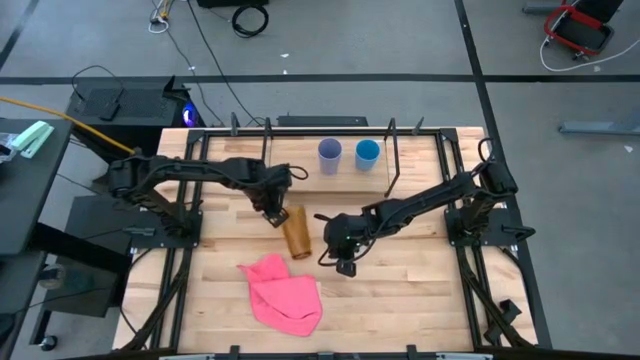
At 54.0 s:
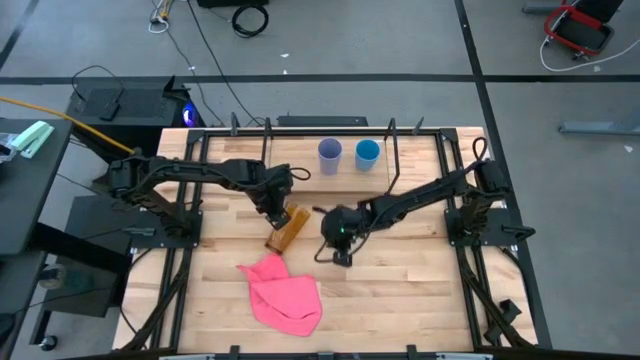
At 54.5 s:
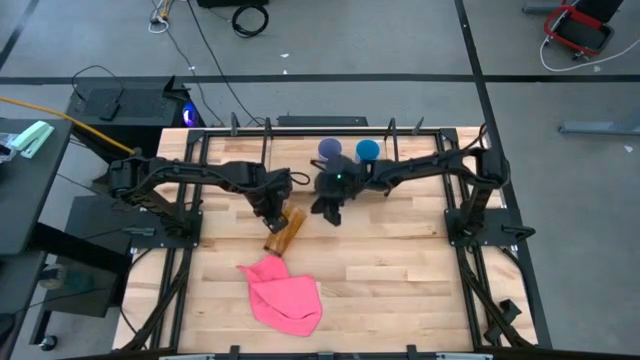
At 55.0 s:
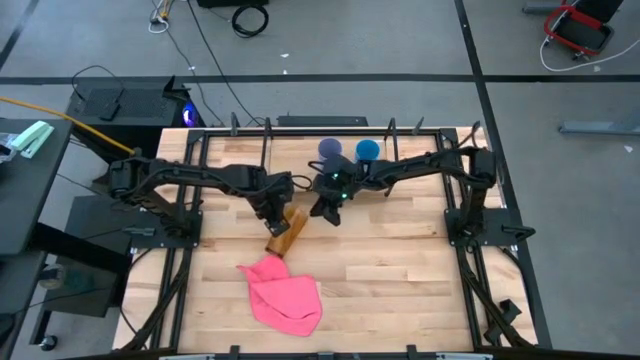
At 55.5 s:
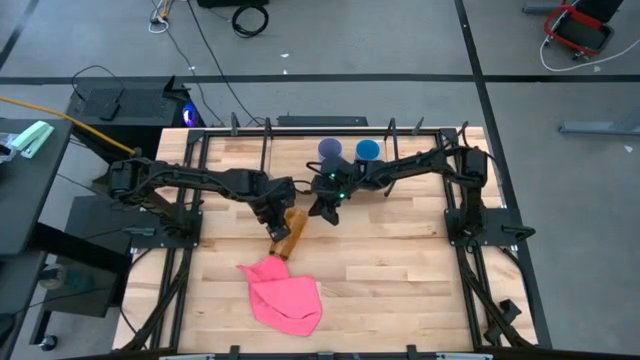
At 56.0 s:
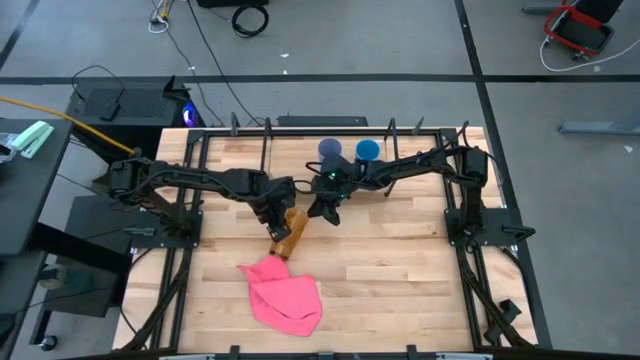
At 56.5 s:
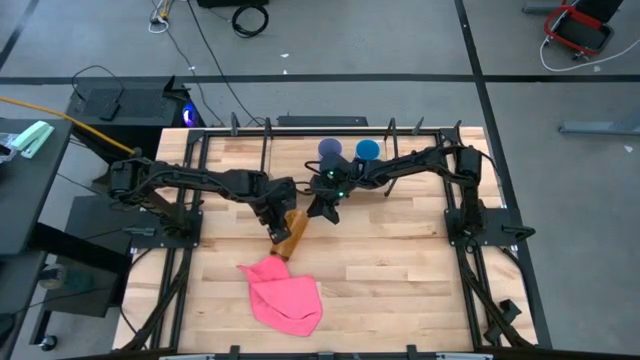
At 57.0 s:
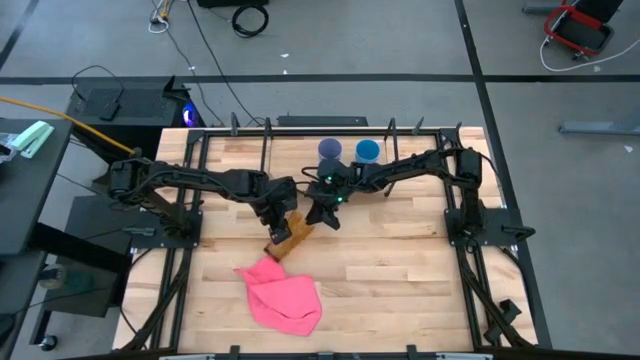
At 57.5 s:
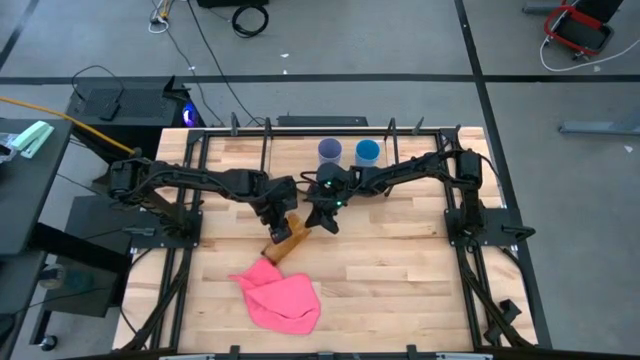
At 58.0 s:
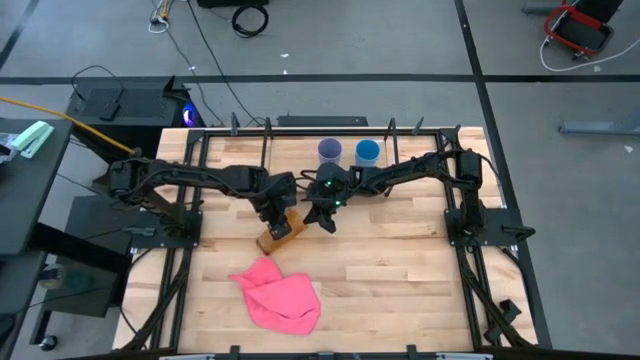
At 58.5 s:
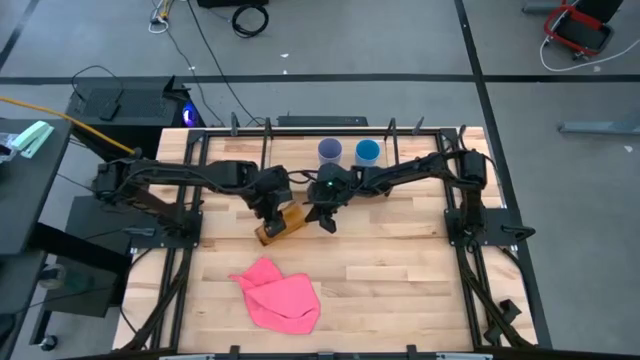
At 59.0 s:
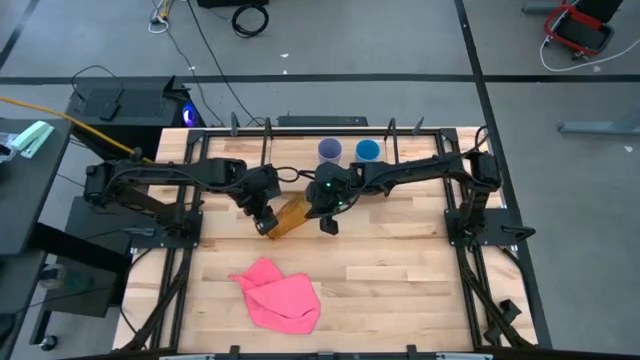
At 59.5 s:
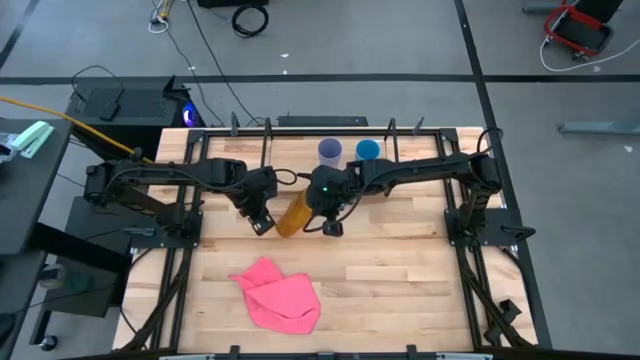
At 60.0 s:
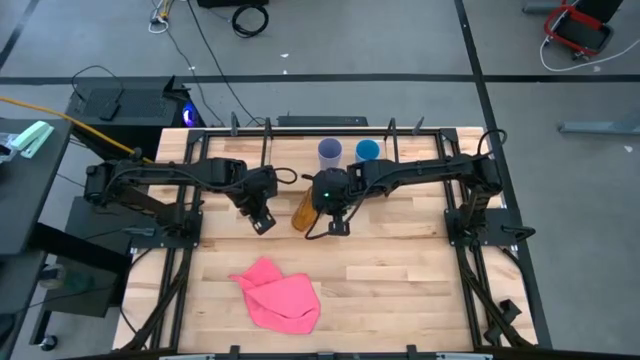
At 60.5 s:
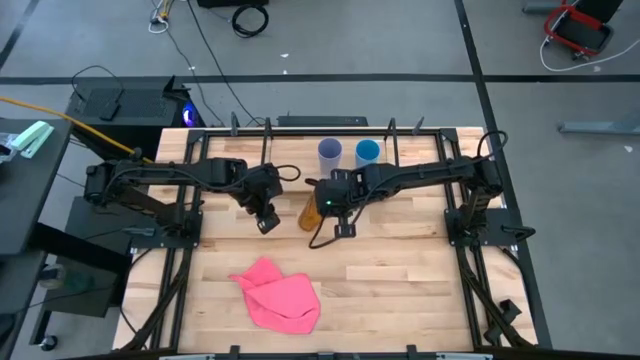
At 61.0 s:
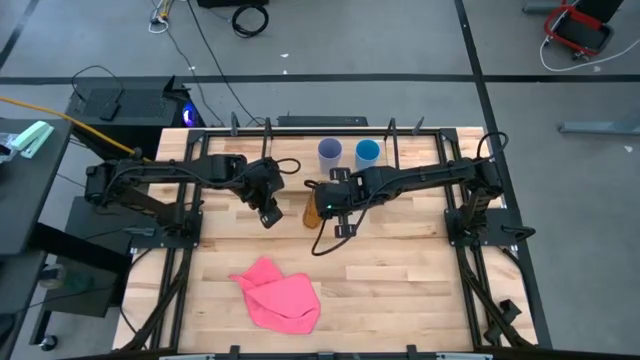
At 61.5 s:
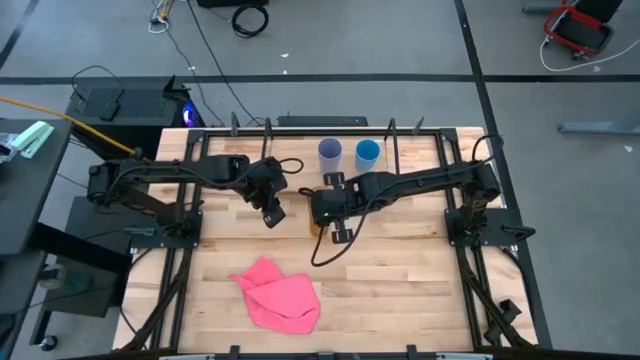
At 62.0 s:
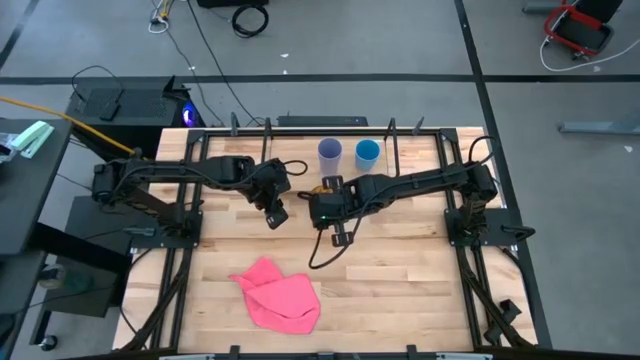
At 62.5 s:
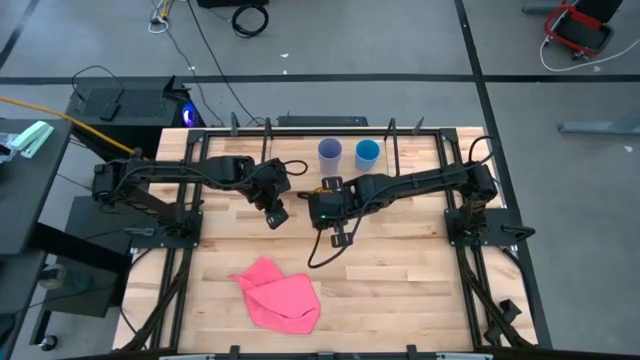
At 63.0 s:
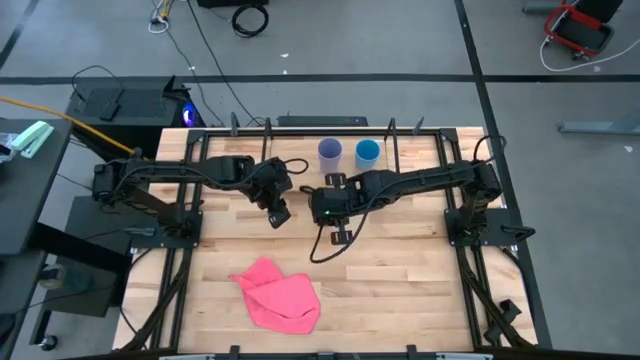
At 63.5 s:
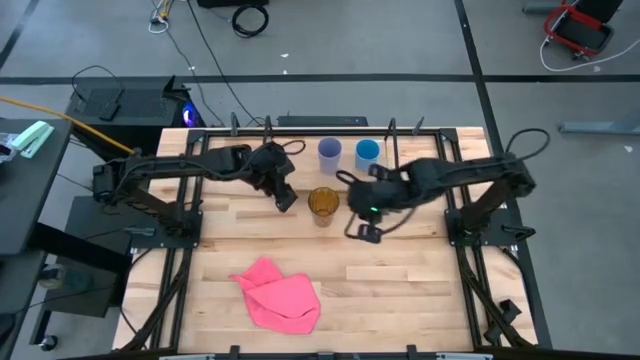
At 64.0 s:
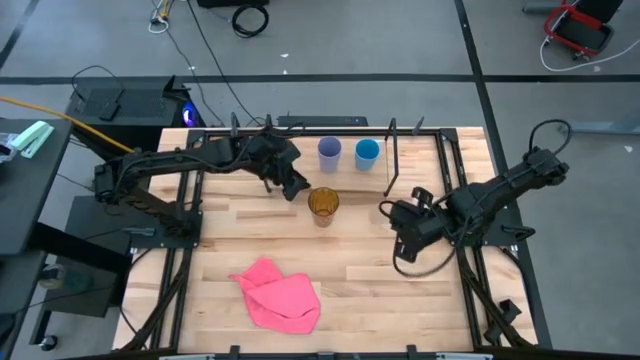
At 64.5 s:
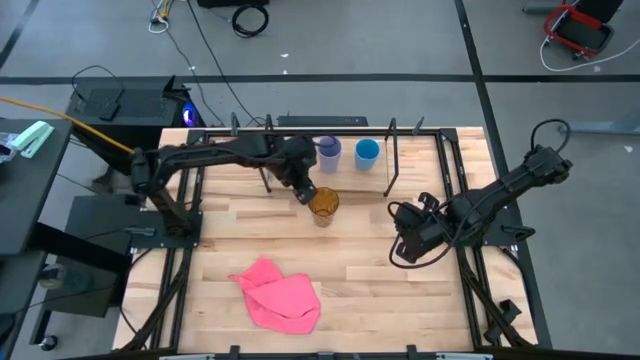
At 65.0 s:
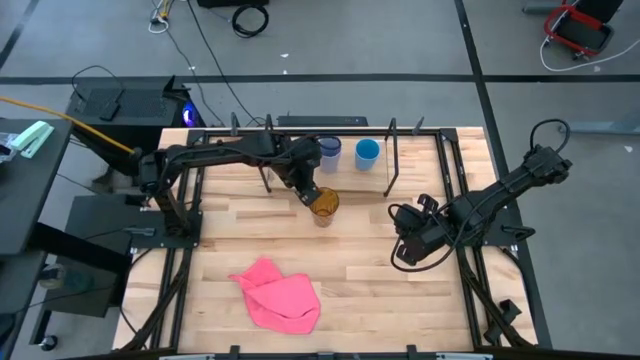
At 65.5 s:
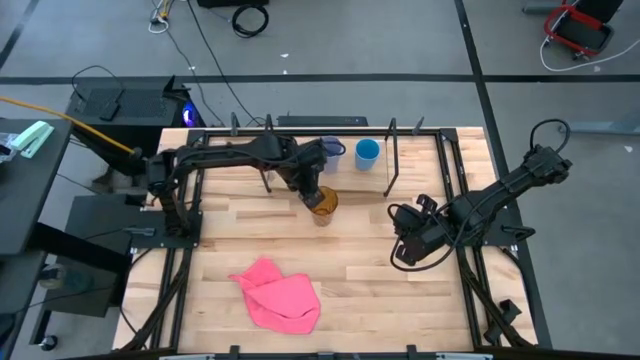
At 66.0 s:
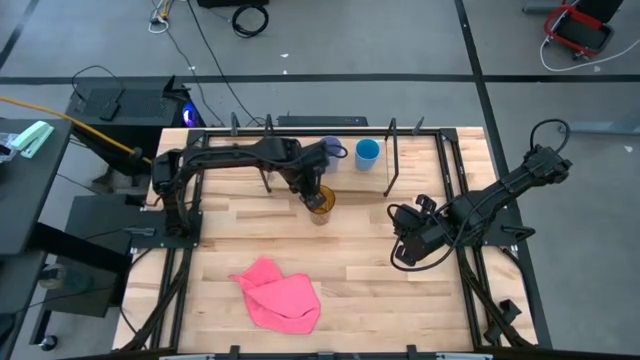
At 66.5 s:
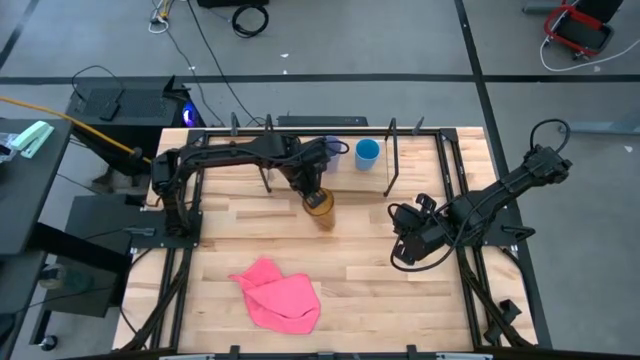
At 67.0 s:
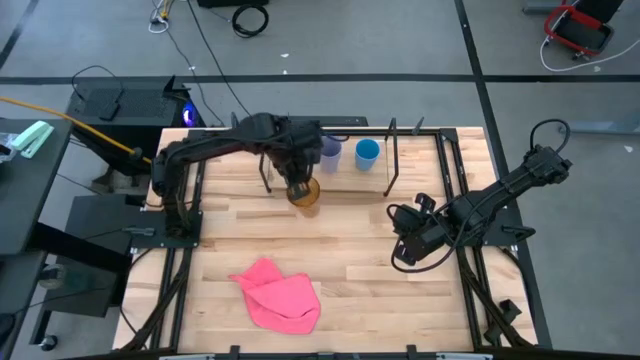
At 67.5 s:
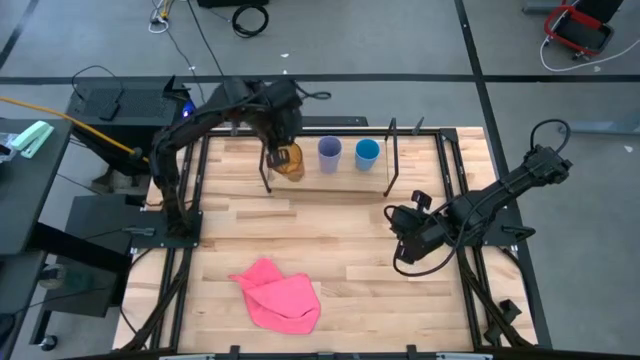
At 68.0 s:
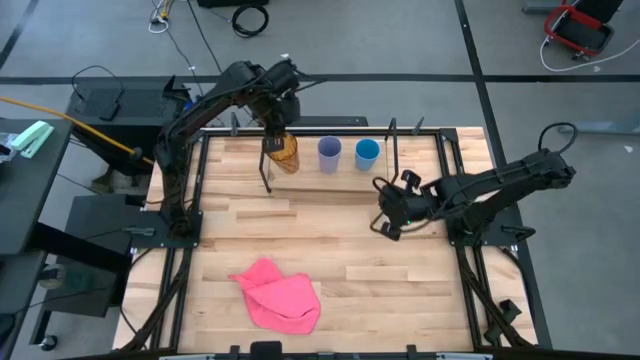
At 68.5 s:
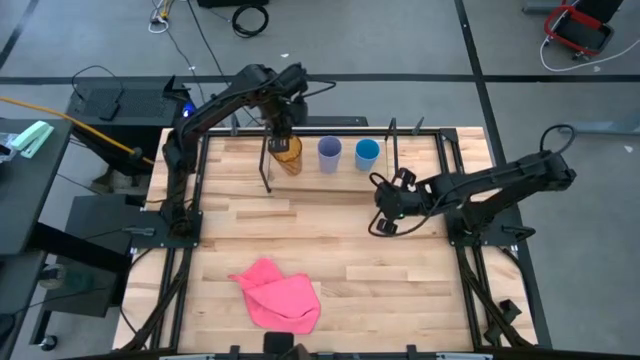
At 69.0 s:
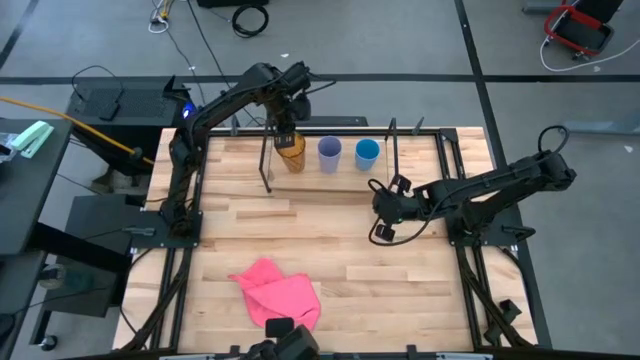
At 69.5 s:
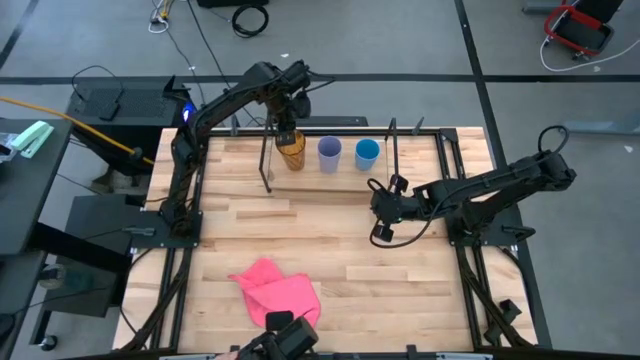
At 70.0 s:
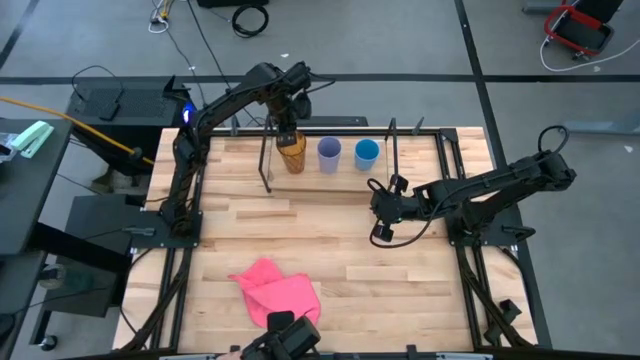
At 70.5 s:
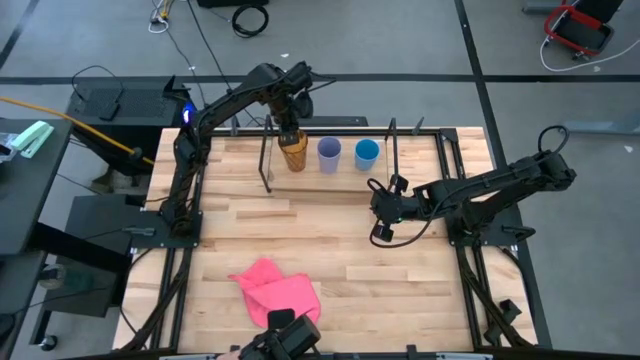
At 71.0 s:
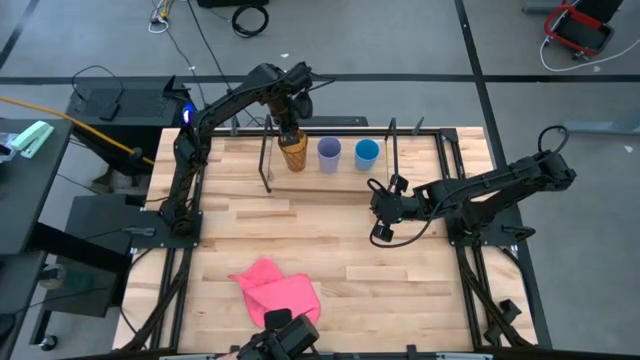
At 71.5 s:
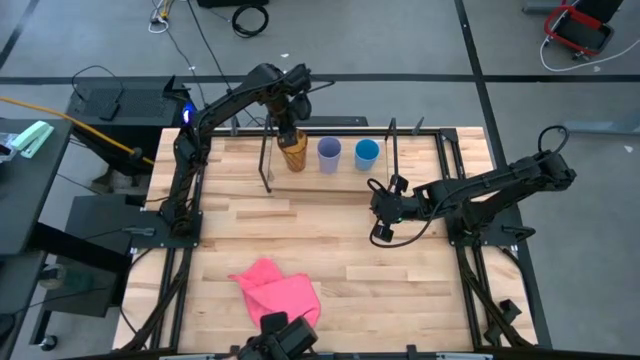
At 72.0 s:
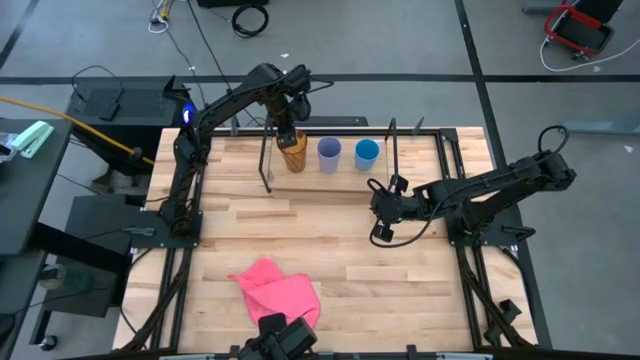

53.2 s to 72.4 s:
Task: Stack small to large cups/mugs on shelf
Put the light brown cup on the shelf

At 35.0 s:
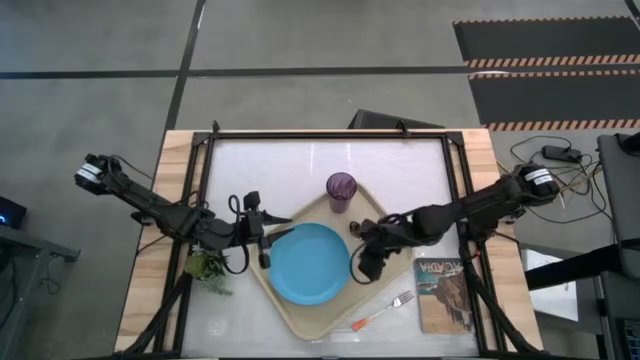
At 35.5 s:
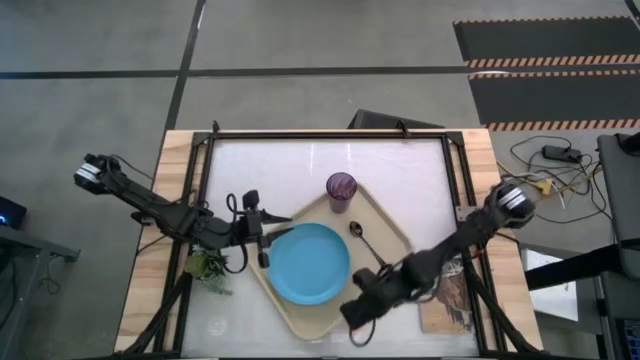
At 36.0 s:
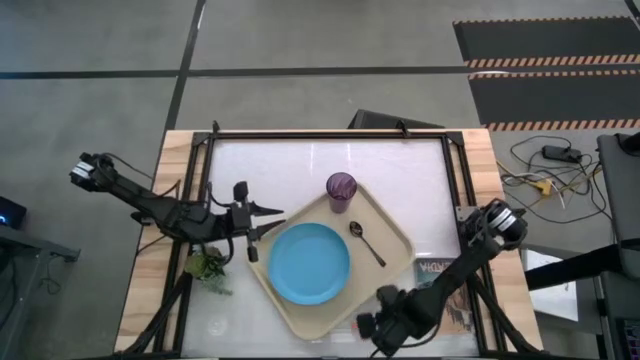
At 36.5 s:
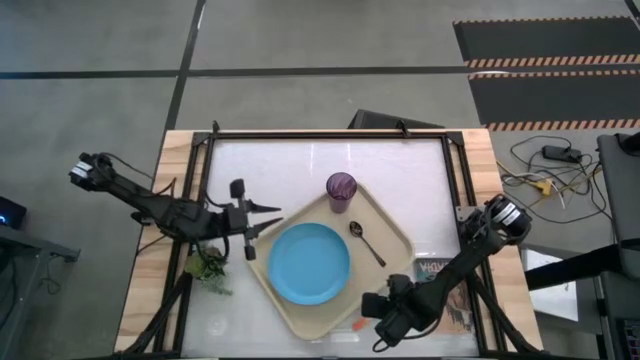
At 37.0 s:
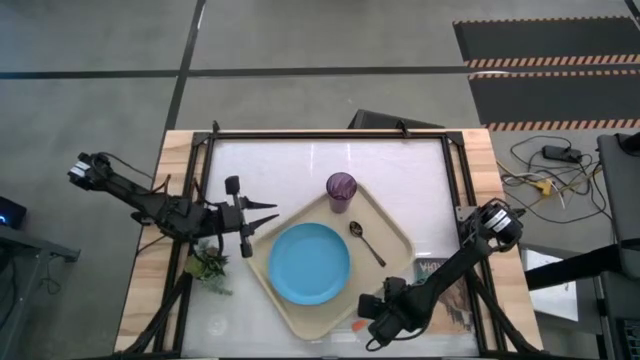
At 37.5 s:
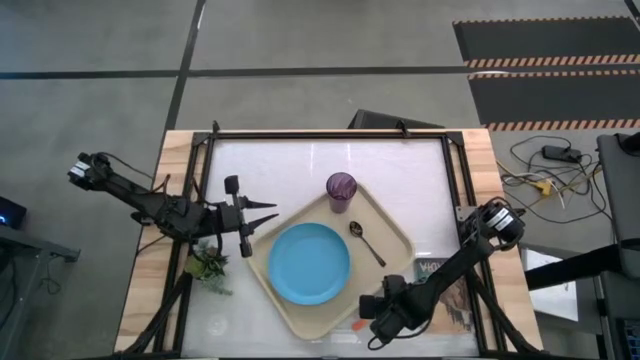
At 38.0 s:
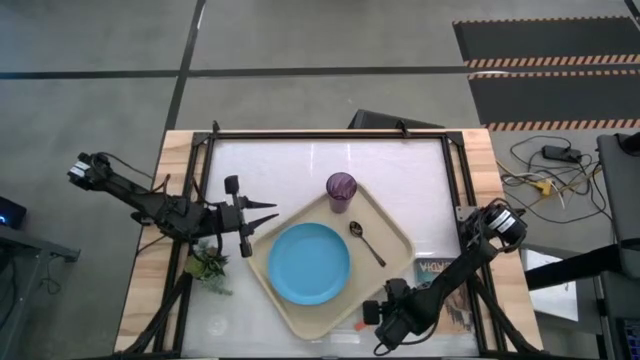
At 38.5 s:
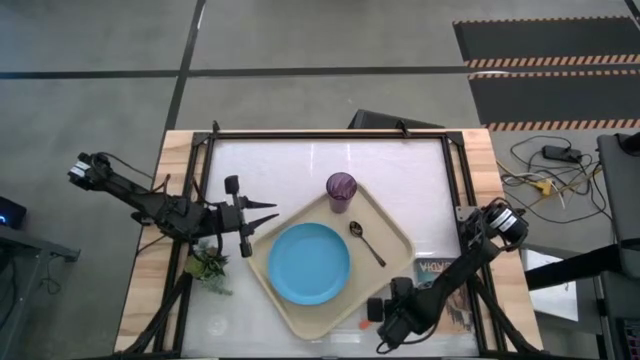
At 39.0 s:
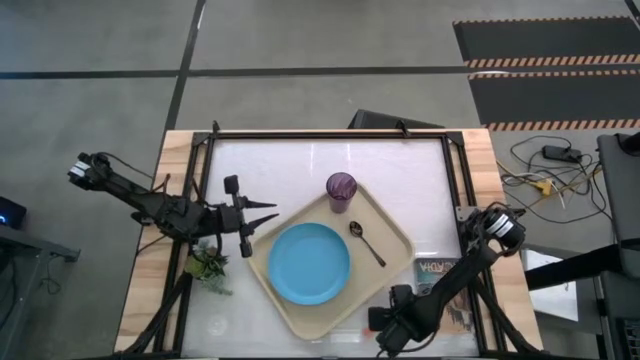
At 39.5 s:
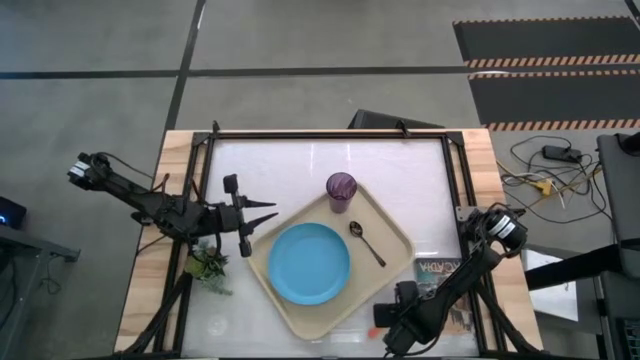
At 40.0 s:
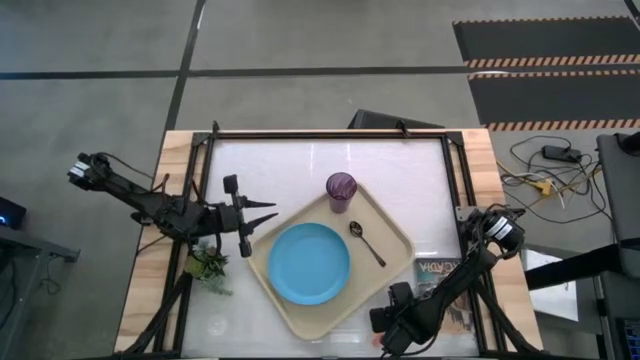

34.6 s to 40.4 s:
Task: Pick and place plate/cup/fork/spoon on tray
Put the fork beside the black spoon on the light brown tray
